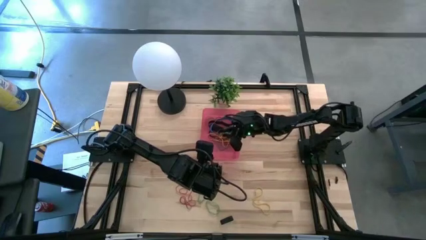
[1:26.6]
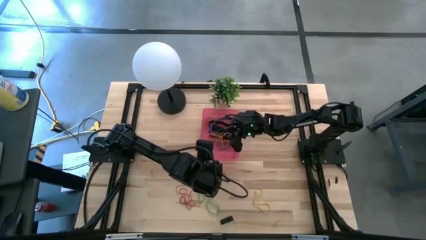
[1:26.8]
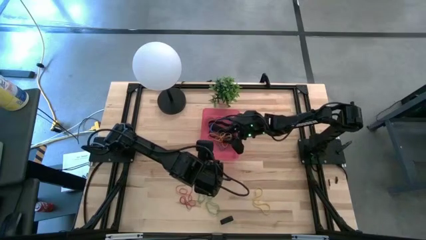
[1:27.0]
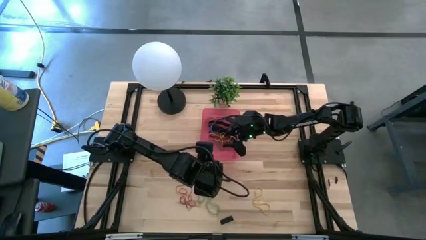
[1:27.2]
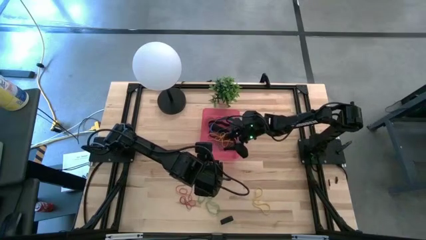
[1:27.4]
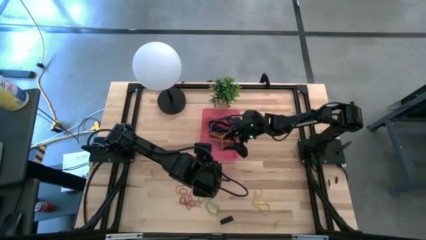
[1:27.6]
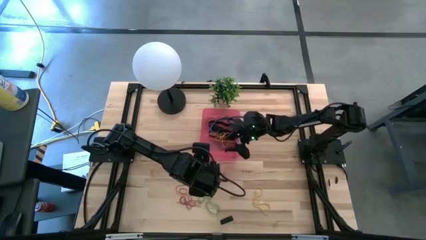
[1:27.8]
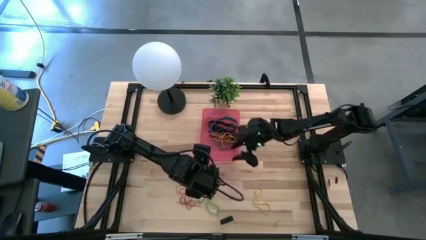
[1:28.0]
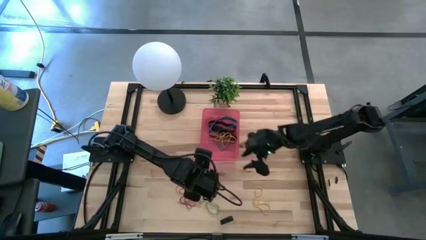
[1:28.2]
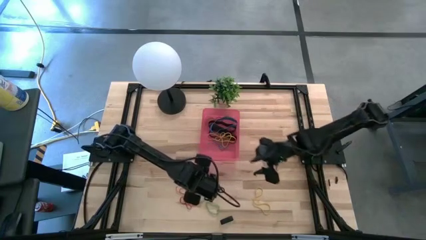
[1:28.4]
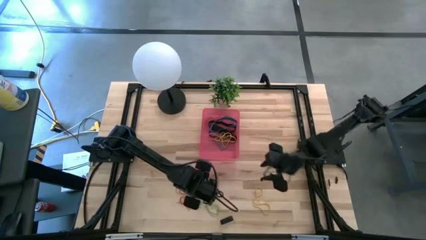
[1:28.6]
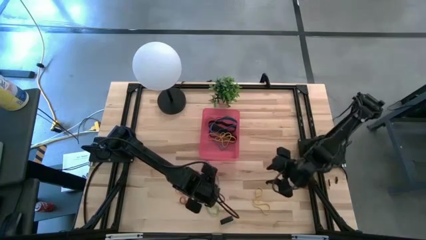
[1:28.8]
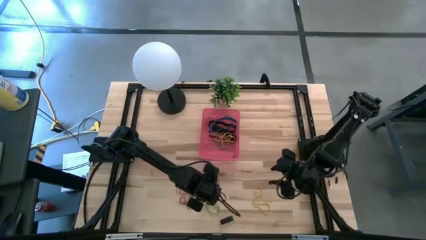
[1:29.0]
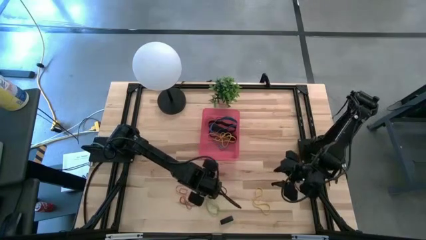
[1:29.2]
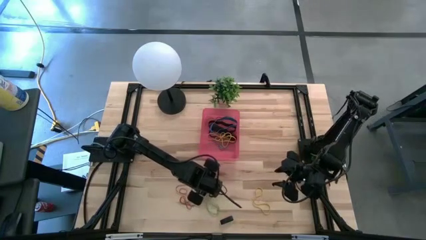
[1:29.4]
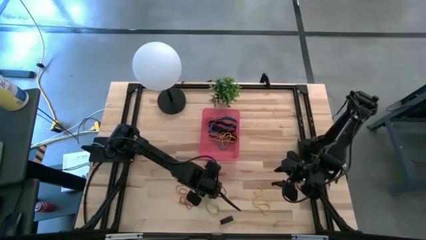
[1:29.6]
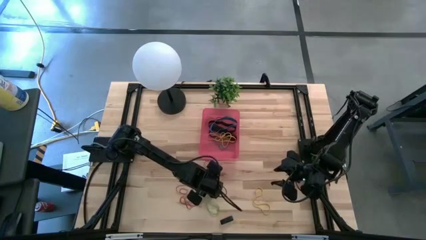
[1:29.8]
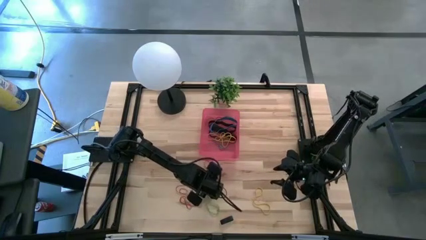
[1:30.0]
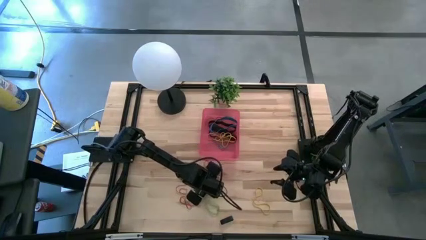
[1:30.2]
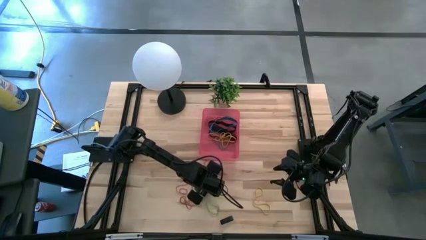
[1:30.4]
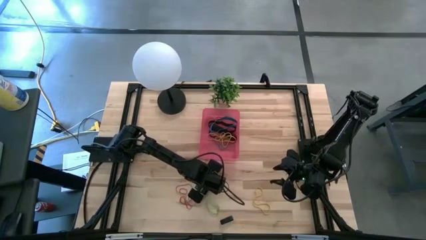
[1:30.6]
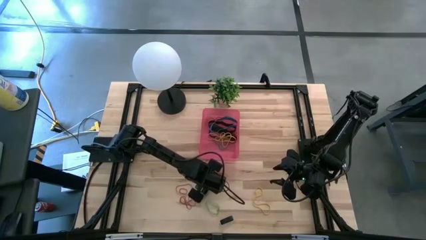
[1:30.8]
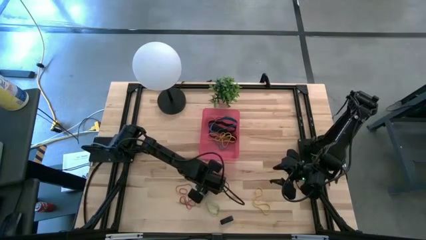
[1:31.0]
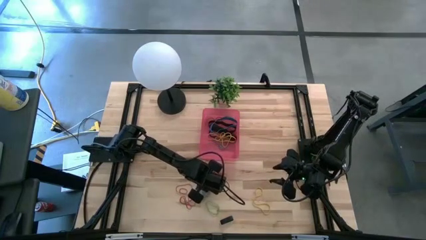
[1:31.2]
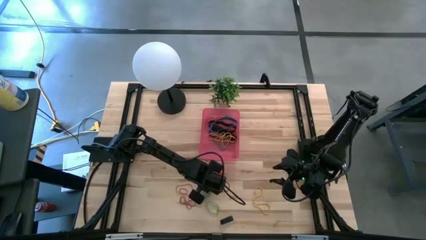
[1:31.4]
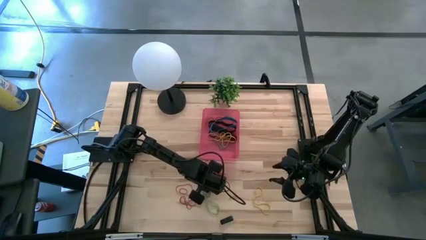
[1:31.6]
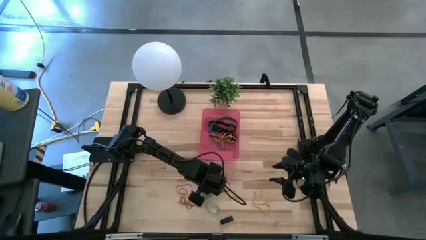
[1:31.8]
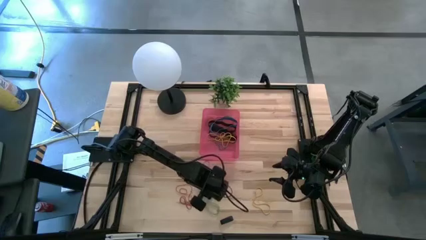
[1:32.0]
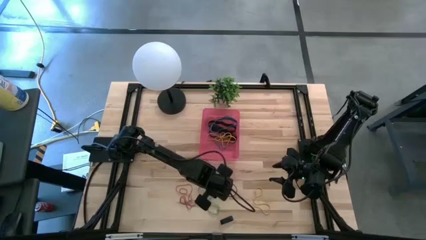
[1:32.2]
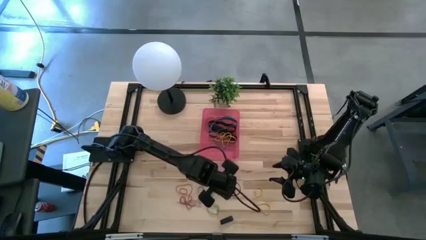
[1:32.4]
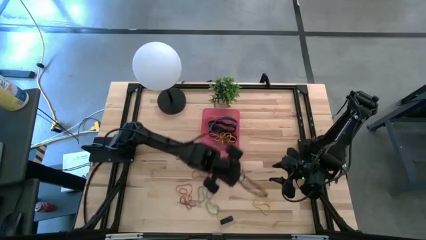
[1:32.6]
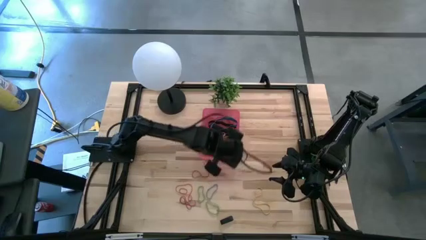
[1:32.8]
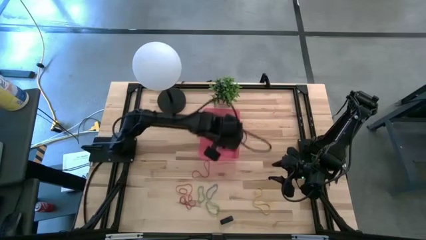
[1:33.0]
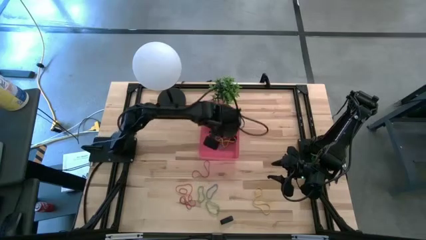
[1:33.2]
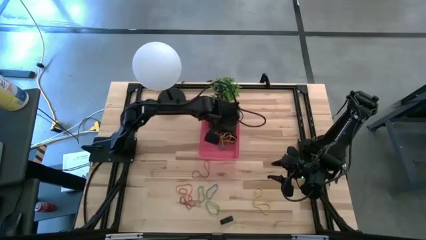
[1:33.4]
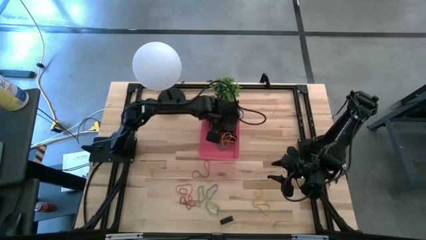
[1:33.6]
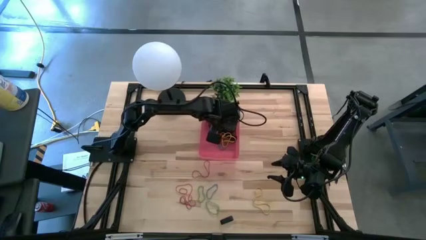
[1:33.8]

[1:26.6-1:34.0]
Task: Pick and place rubber bands into bin
Put the blue rubber band into the red bin

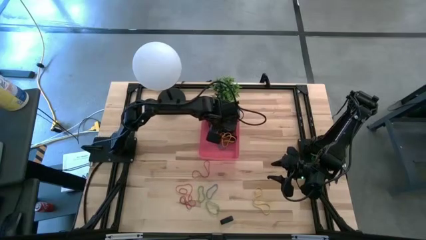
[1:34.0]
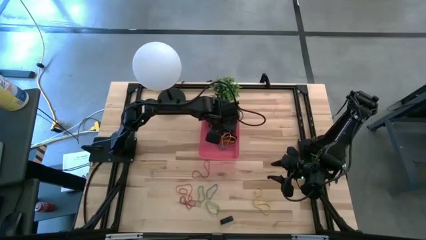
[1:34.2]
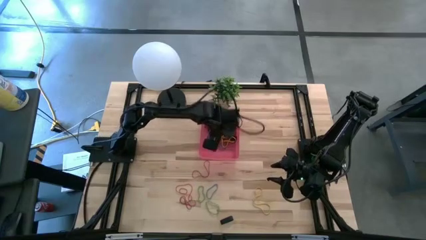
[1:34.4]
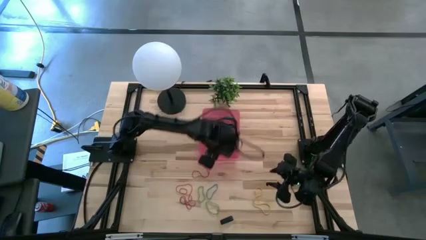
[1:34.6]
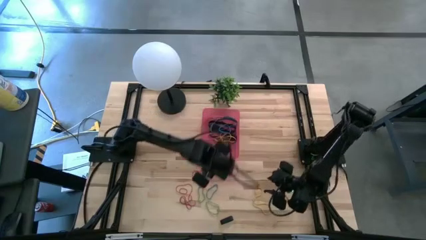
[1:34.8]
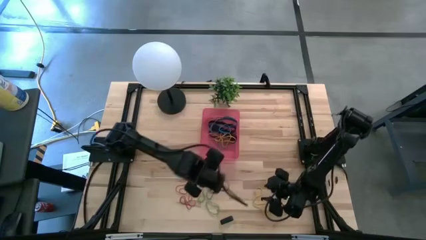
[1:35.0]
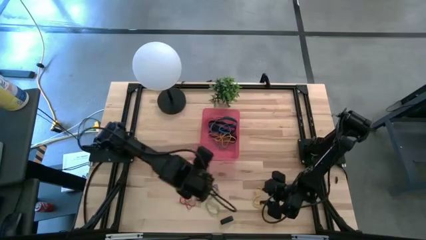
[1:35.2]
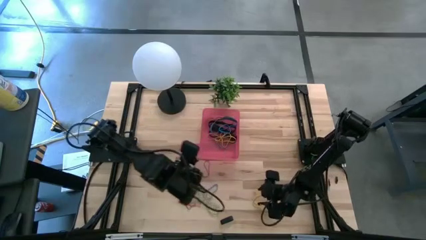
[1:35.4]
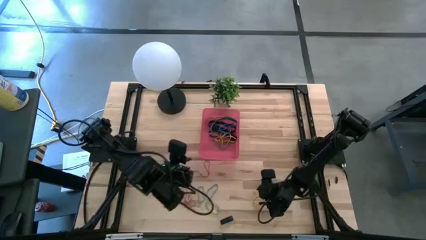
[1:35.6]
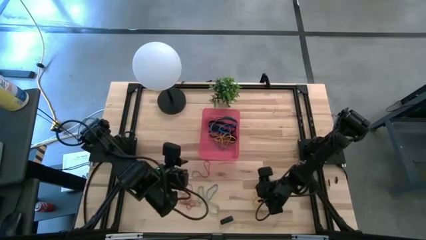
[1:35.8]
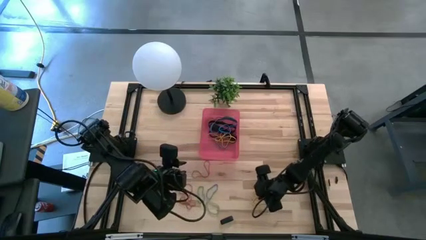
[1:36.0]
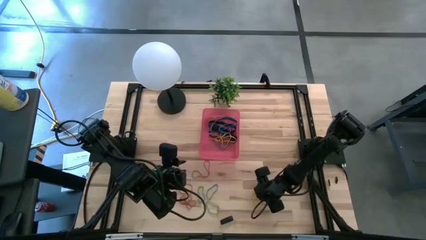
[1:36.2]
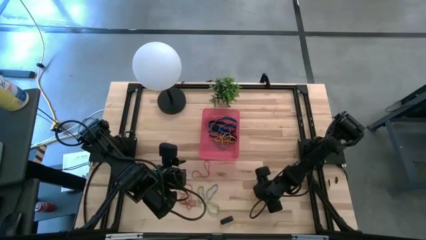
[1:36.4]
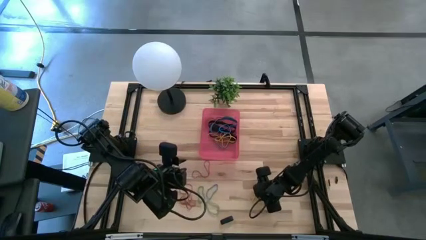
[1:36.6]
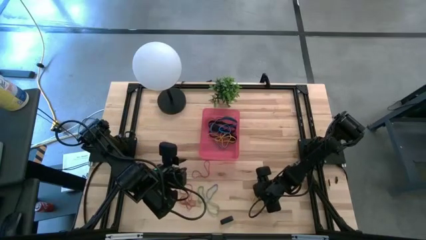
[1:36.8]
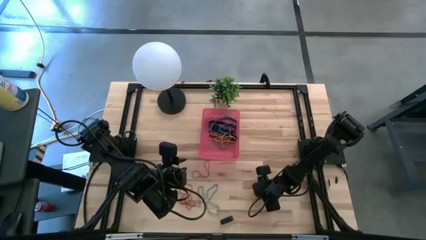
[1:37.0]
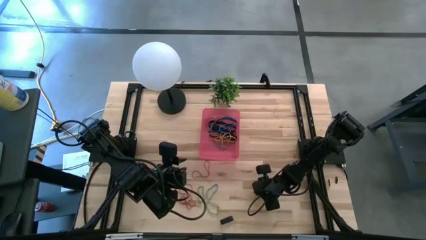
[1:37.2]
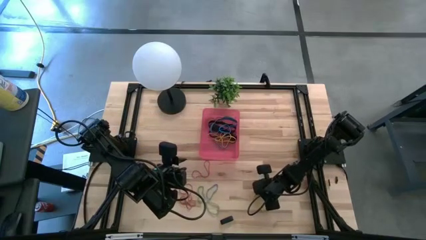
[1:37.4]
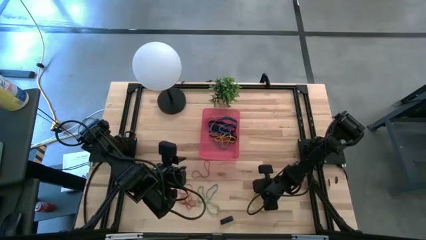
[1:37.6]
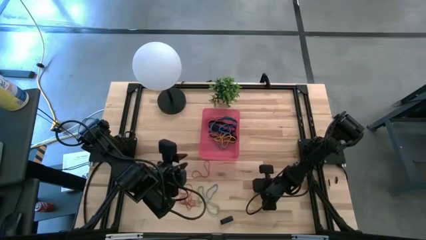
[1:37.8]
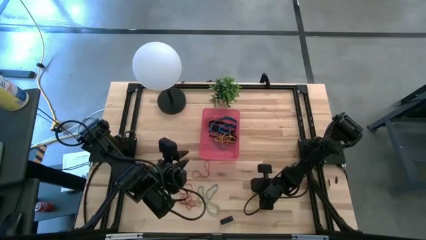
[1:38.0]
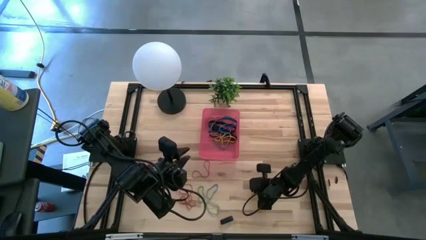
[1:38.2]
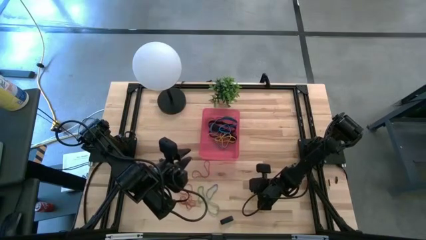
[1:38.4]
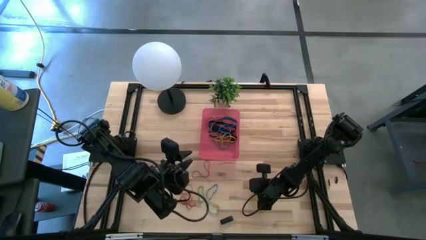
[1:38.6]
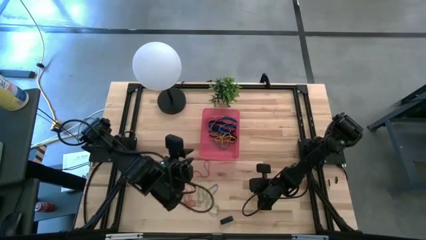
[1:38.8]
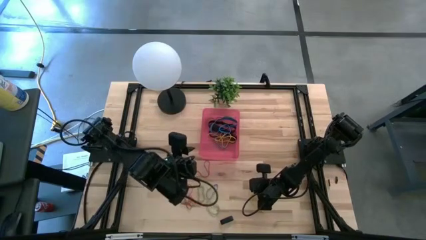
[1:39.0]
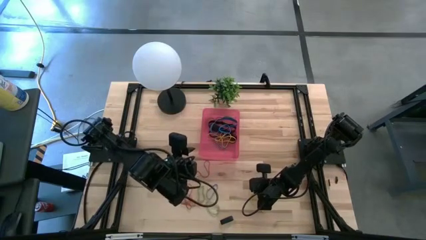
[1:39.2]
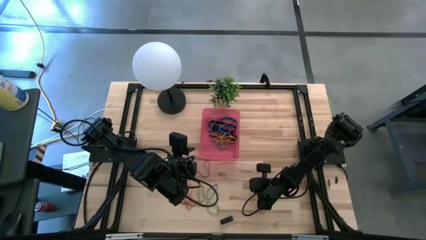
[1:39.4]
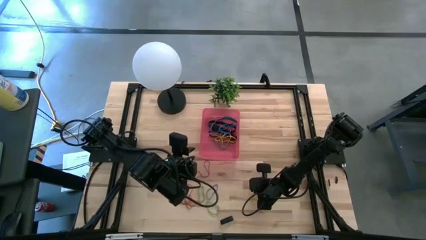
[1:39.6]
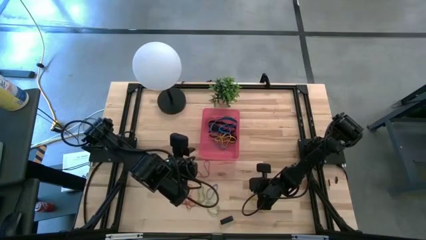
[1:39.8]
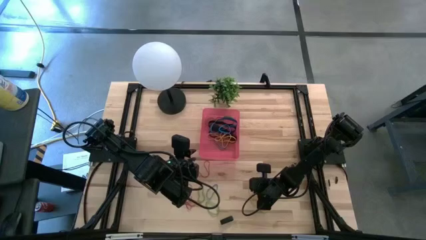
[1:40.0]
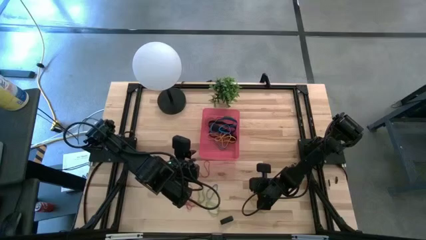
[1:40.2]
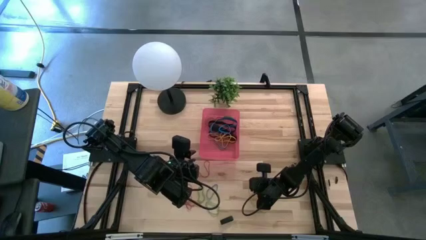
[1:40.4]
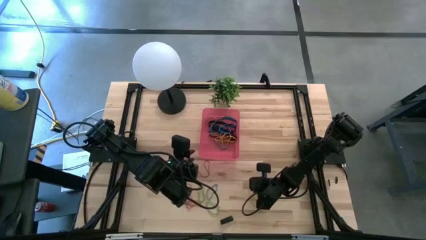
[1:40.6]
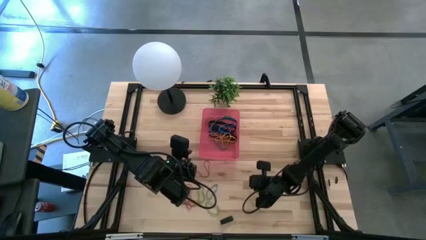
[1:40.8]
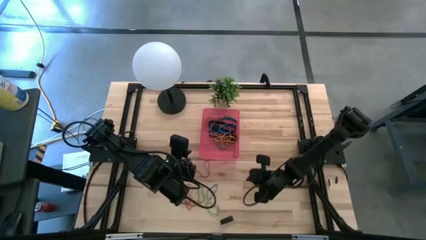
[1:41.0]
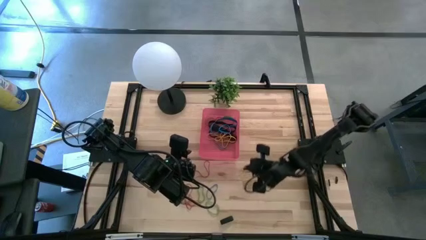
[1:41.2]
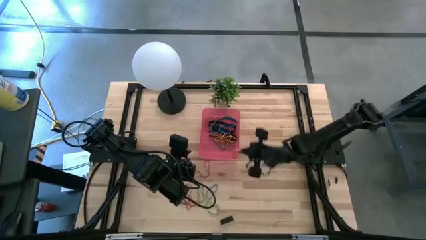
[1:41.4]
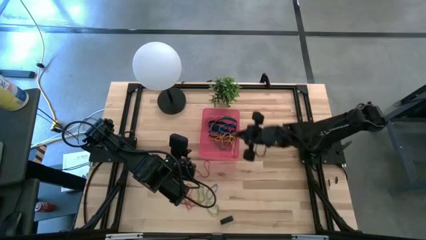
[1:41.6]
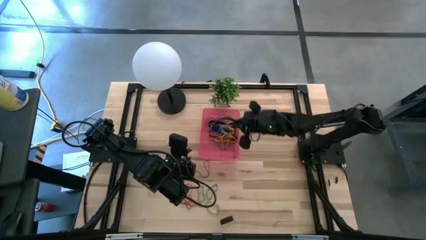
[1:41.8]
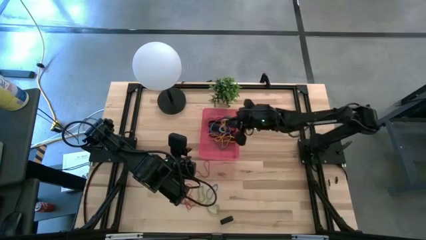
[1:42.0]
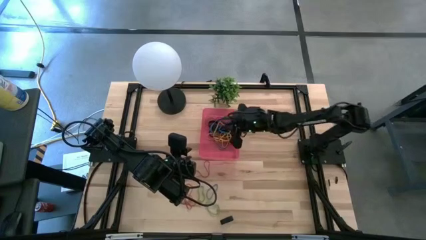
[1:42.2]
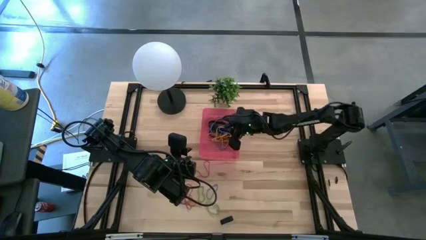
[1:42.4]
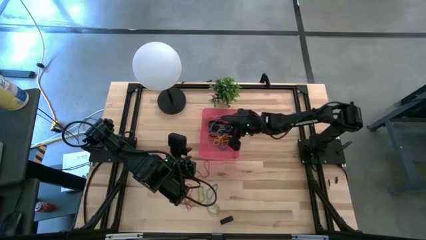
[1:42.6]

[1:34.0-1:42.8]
Put the yellow rubber band into the red bin
